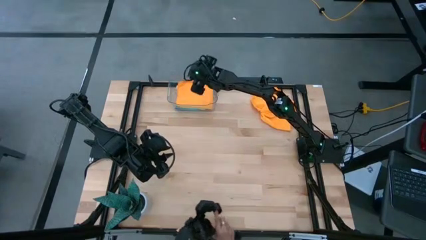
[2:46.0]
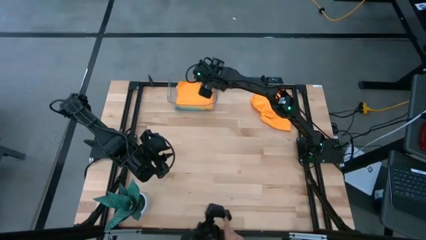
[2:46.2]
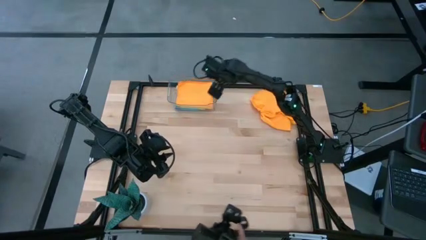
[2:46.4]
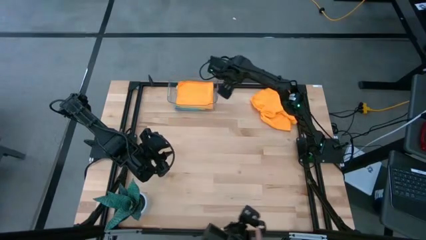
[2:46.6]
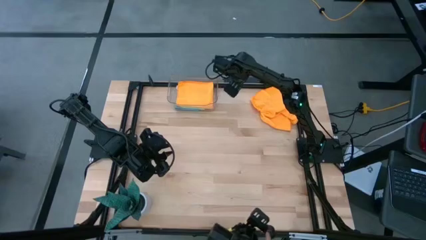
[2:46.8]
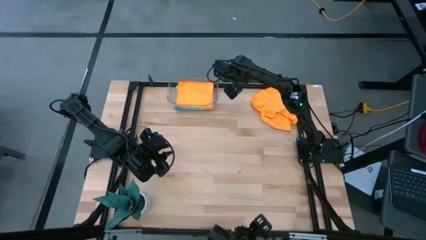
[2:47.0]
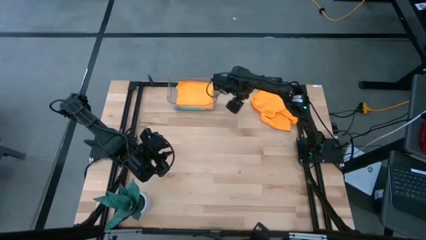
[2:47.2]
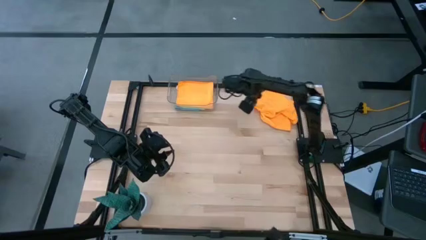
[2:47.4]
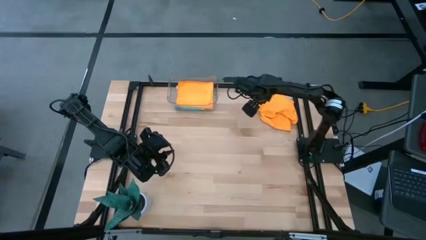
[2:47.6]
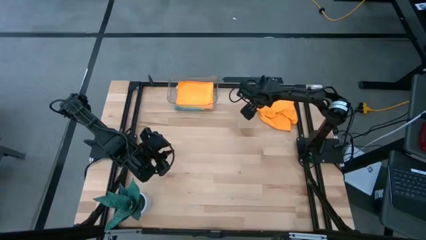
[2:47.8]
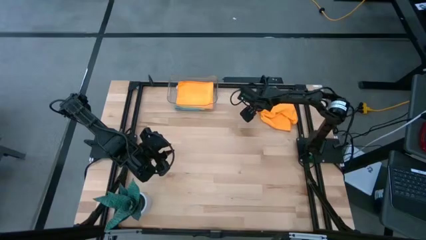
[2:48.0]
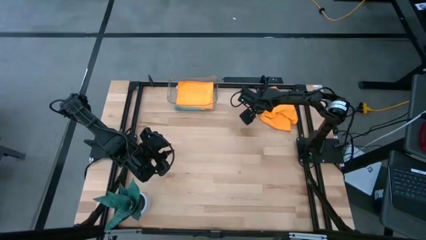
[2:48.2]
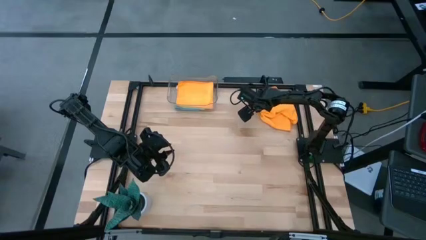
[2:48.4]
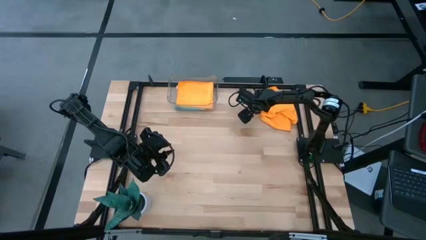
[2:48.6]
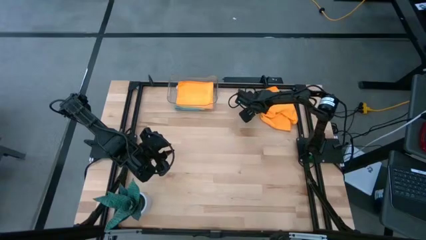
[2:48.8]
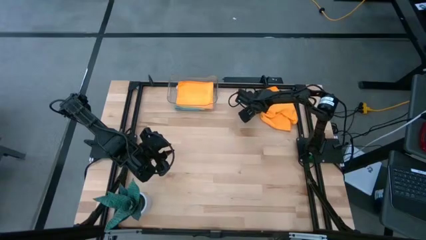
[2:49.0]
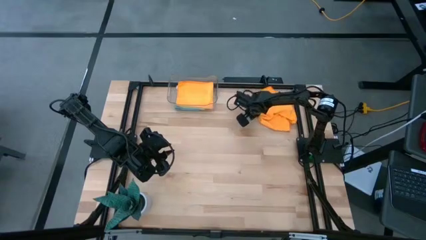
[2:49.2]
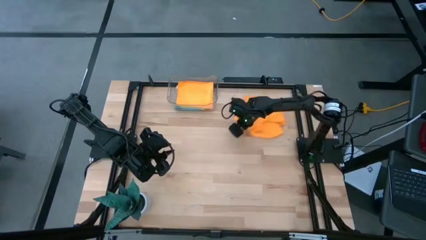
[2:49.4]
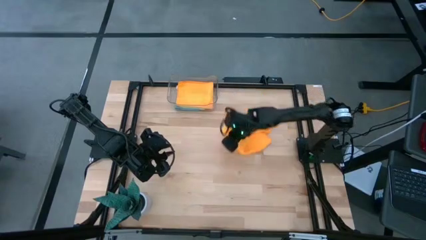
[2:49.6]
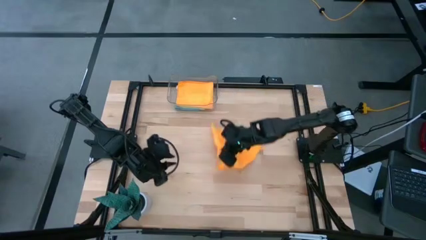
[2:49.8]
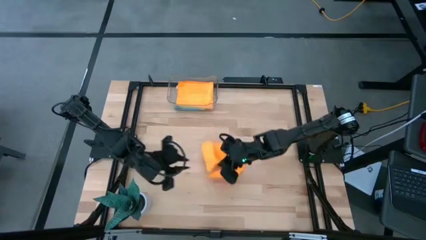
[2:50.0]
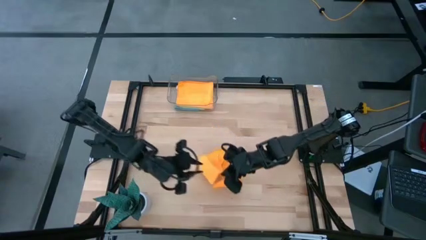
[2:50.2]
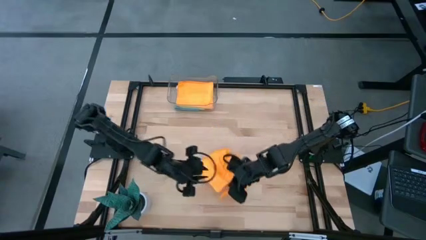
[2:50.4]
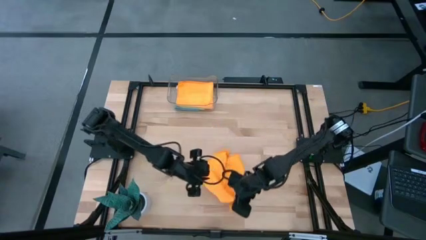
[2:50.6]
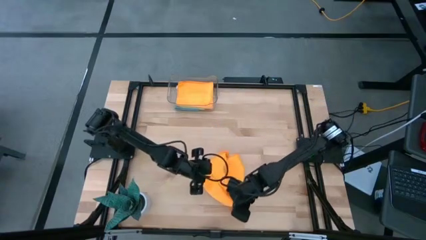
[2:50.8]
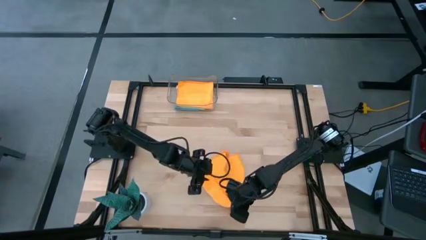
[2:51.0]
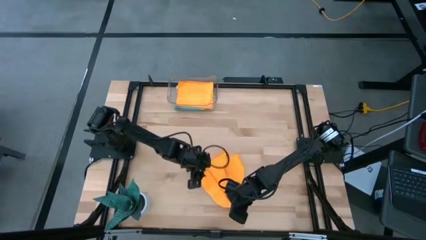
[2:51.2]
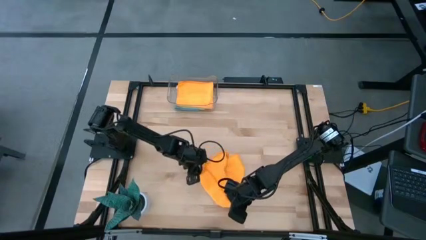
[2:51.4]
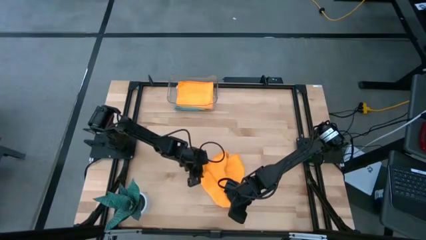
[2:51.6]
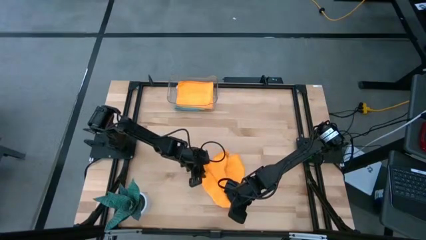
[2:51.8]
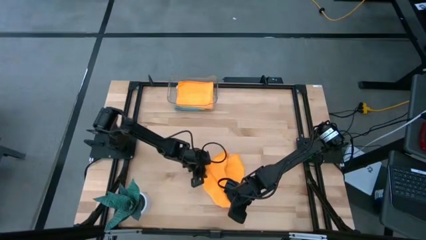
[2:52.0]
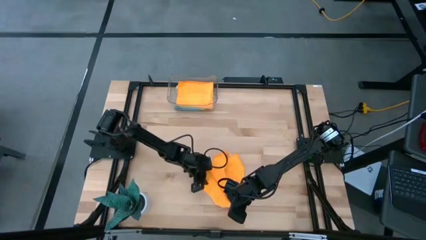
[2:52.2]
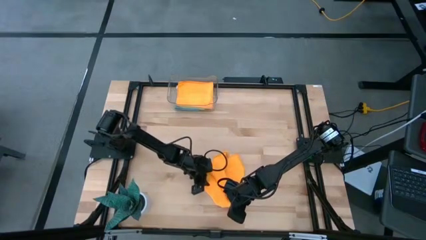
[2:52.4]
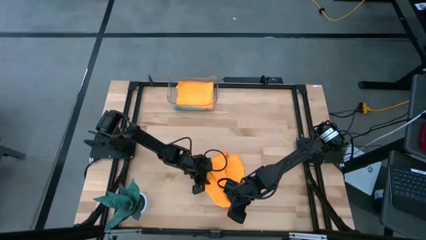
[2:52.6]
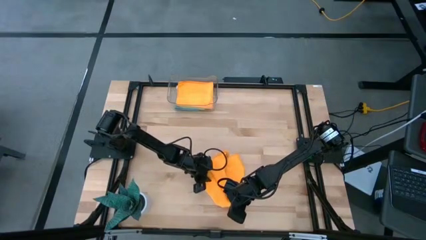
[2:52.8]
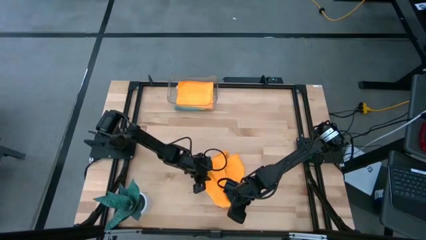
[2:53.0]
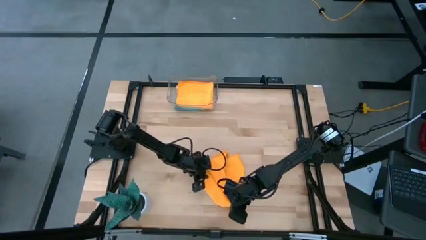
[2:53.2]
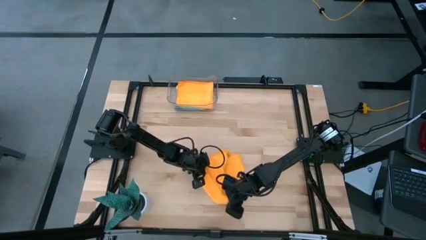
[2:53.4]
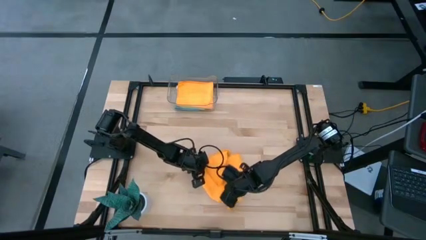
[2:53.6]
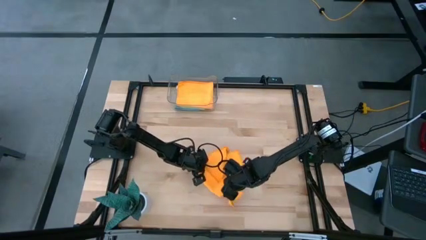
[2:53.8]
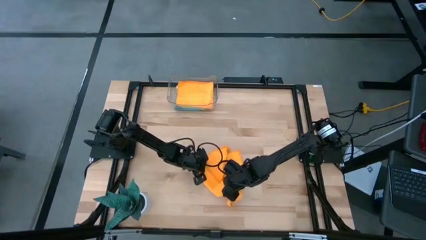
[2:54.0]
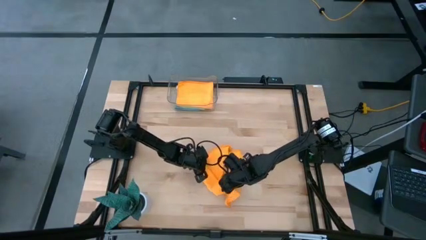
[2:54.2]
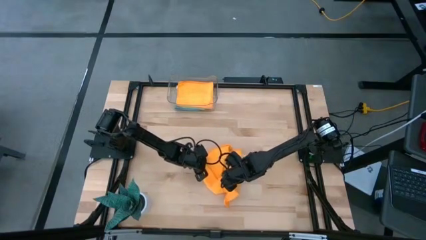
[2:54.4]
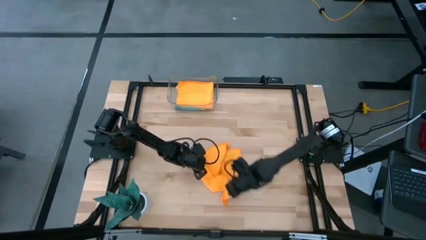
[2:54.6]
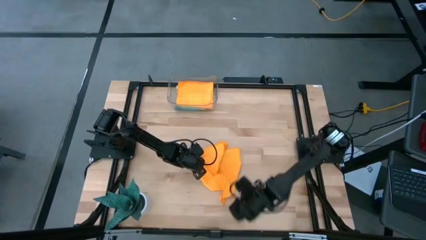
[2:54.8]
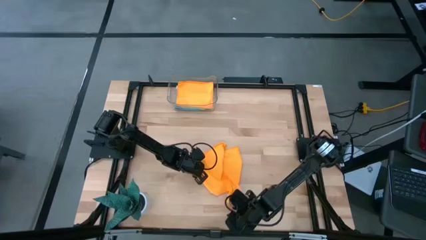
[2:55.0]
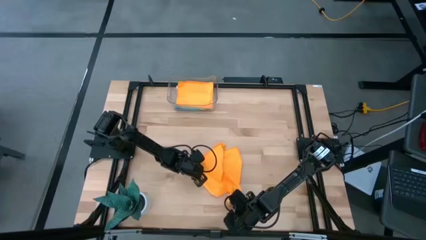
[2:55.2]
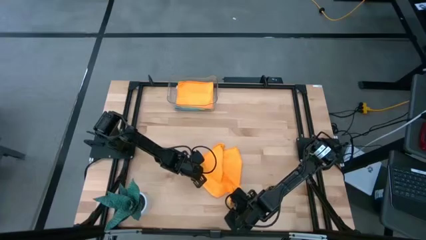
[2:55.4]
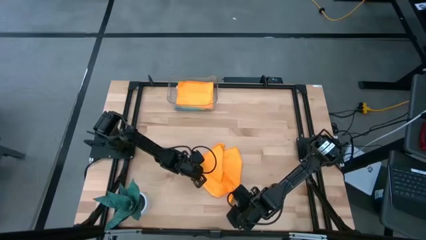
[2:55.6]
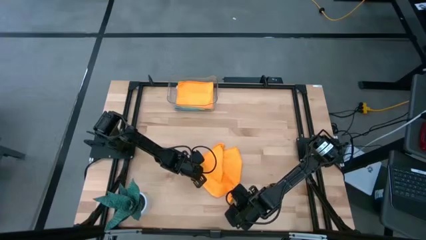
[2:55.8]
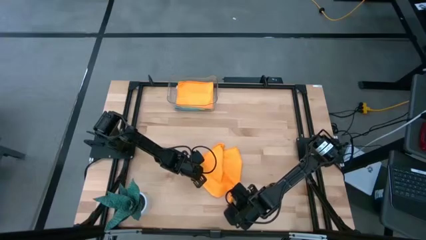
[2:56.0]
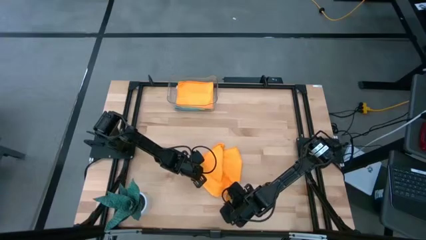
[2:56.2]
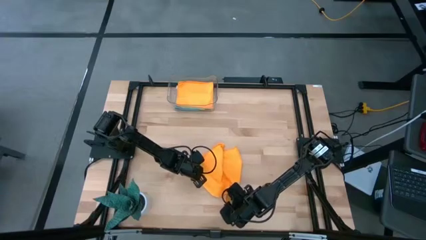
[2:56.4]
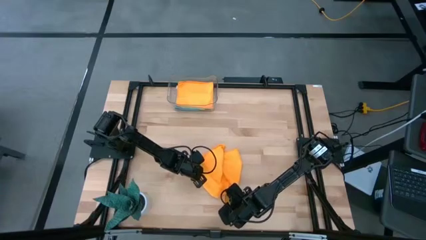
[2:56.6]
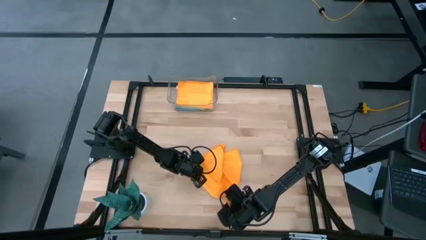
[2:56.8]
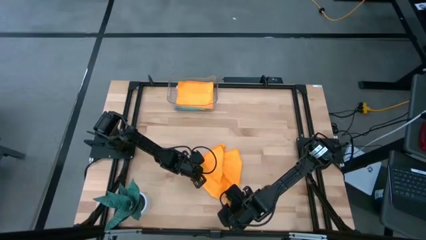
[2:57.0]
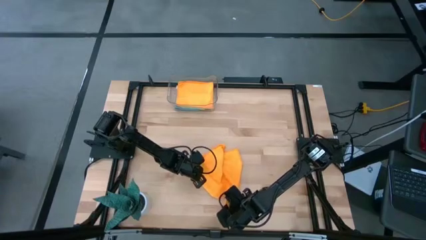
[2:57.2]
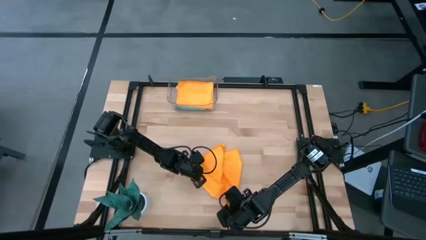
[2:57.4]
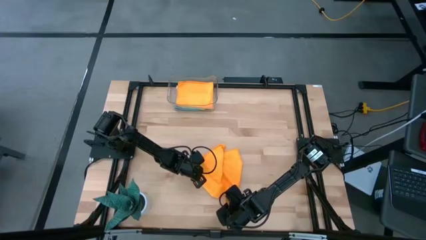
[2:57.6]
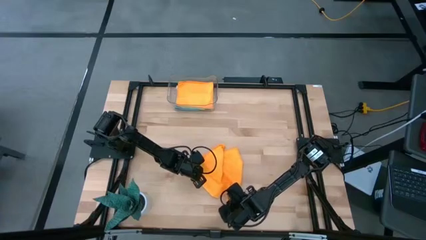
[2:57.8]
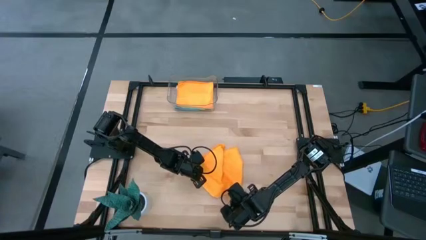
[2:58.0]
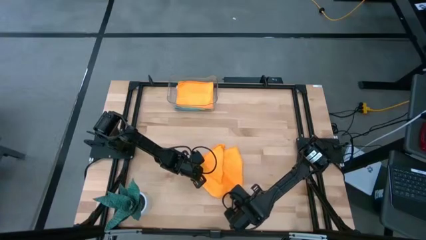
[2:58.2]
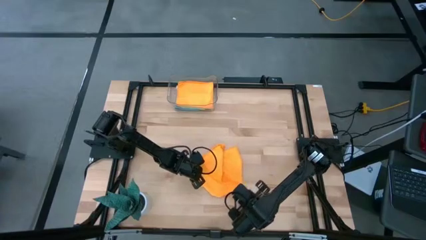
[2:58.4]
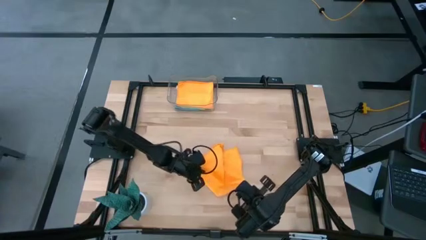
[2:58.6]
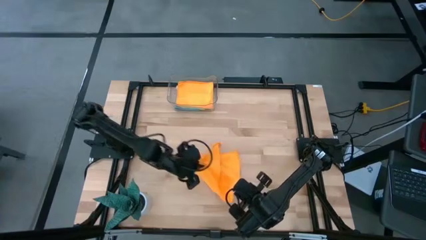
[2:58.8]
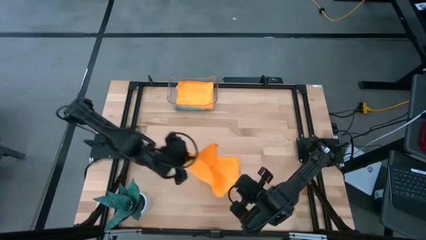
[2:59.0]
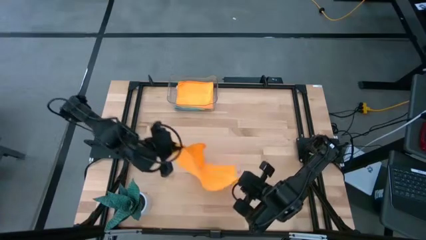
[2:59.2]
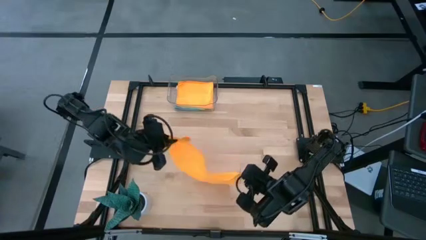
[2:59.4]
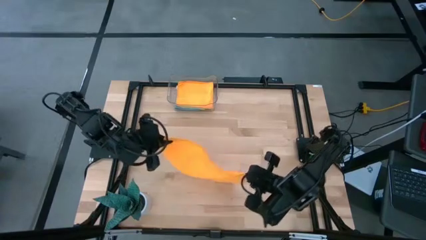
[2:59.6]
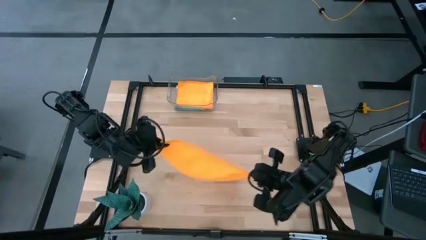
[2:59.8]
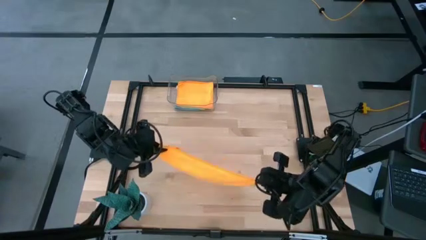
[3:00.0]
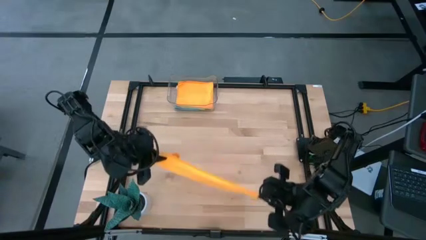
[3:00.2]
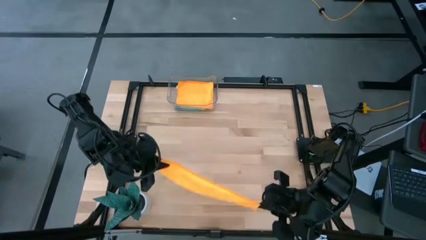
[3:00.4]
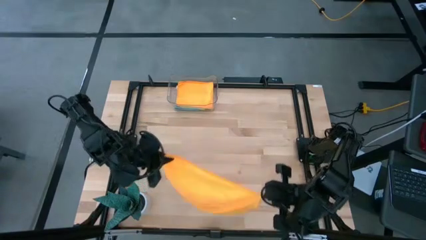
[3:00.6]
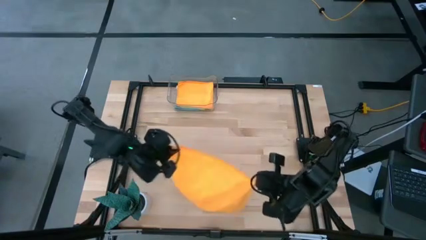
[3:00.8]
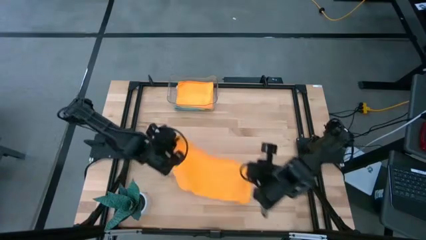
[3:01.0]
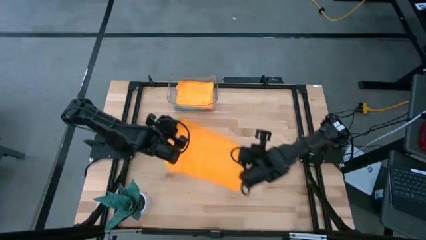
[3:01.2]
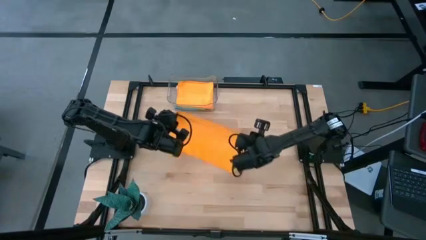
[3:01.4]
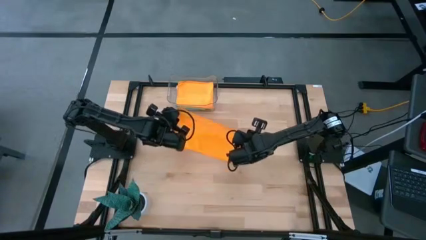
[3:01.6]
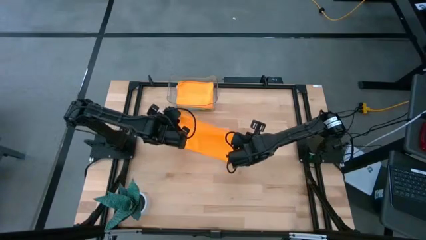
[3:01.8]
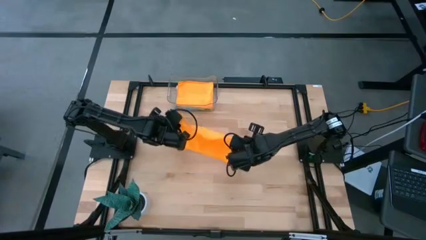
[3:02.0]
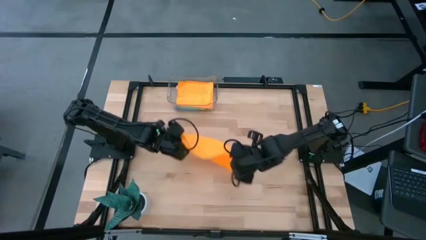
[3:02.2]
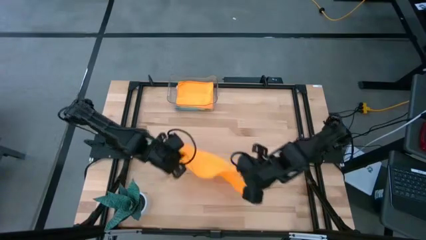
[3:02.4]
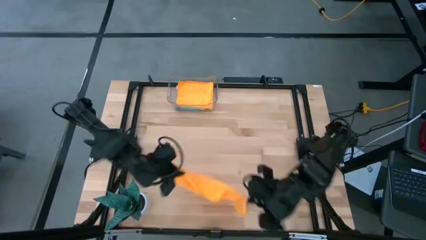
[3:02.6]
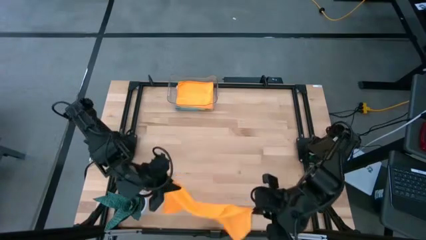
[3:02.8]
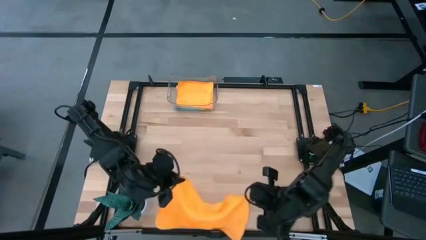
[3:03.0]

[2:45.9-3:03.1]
Task: Fold microfiber towels
Fold the orange microfiber cloth
